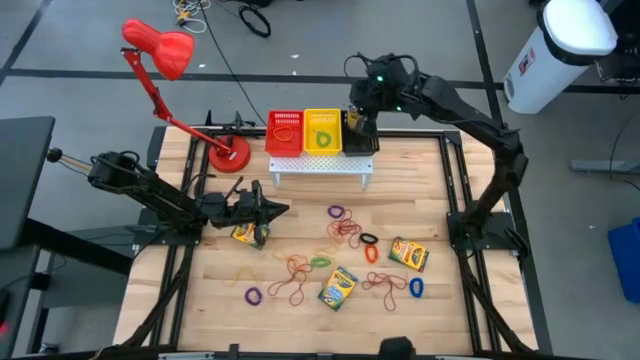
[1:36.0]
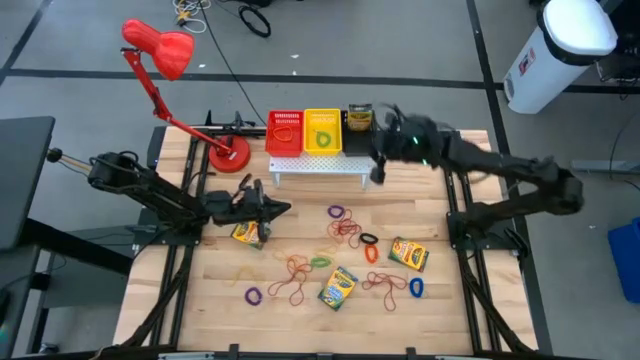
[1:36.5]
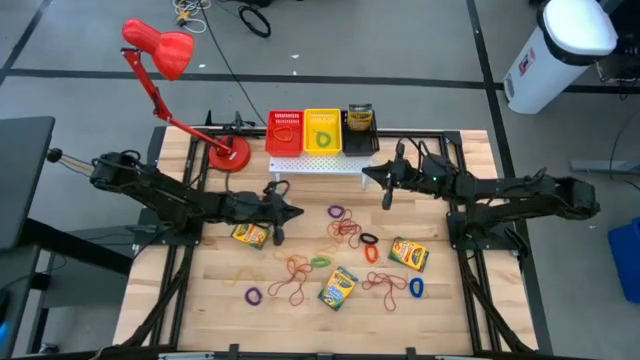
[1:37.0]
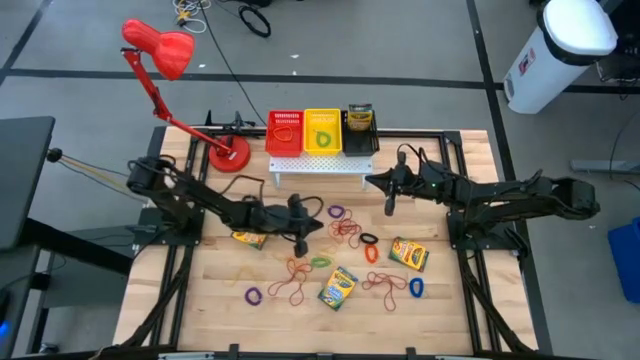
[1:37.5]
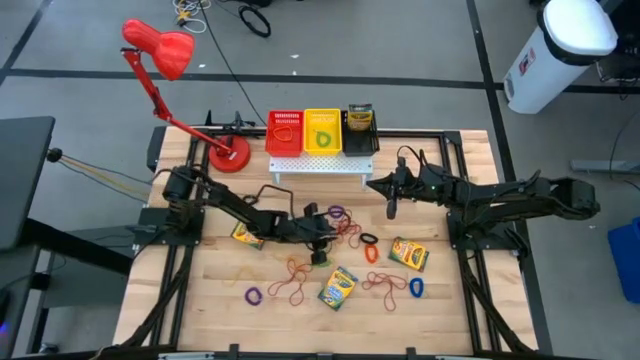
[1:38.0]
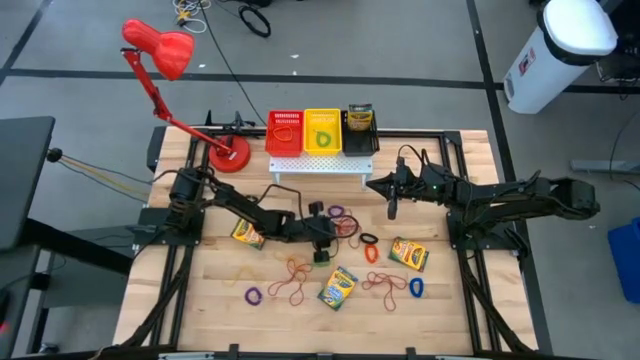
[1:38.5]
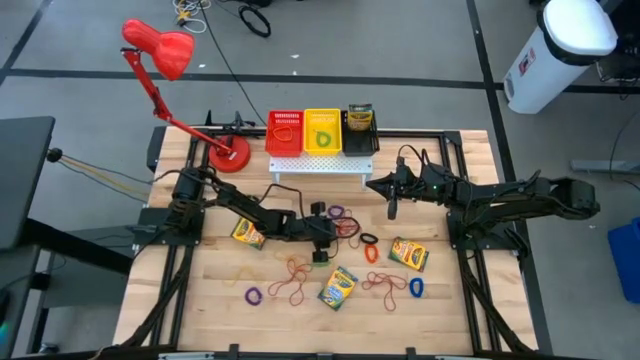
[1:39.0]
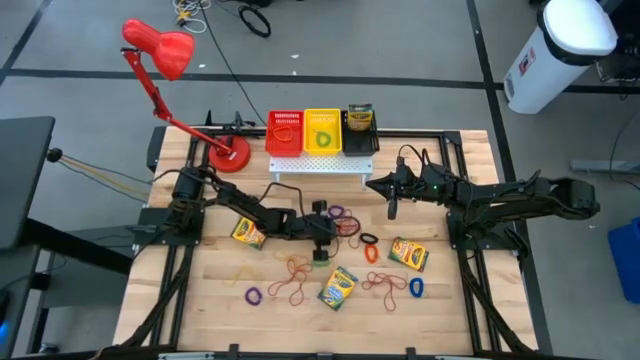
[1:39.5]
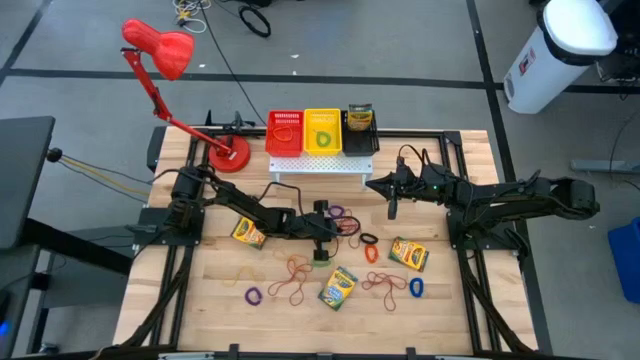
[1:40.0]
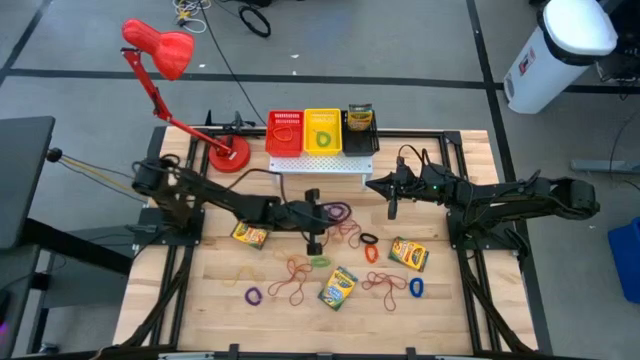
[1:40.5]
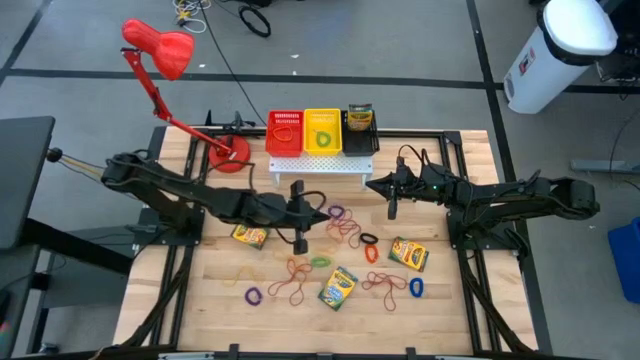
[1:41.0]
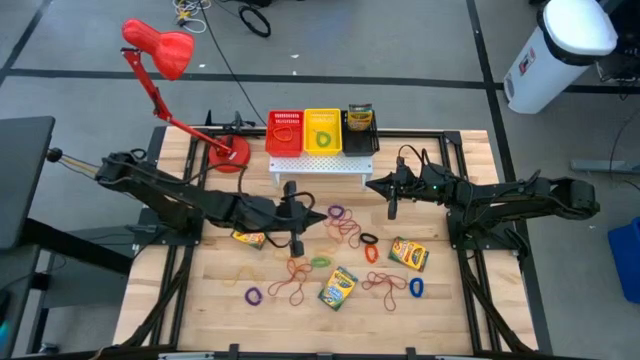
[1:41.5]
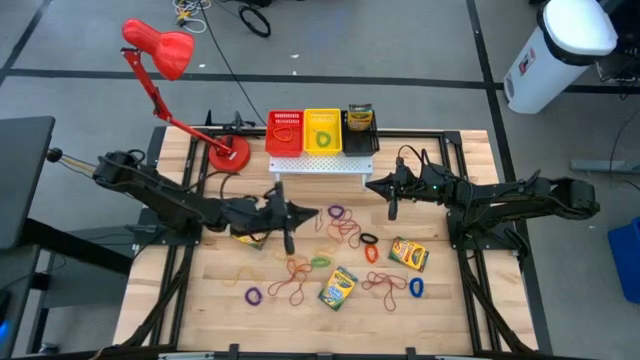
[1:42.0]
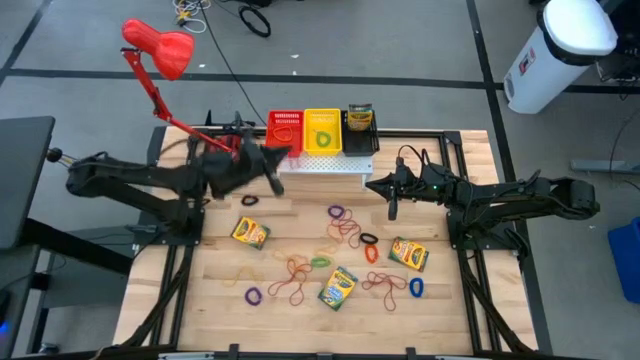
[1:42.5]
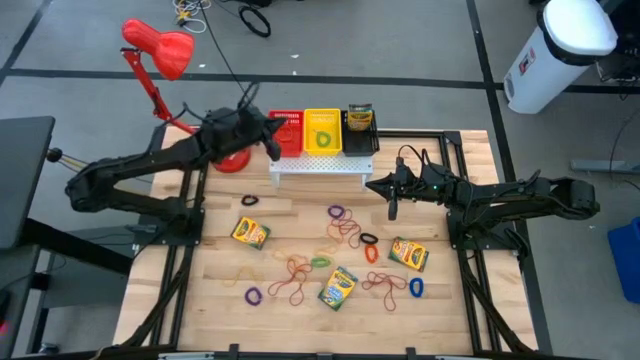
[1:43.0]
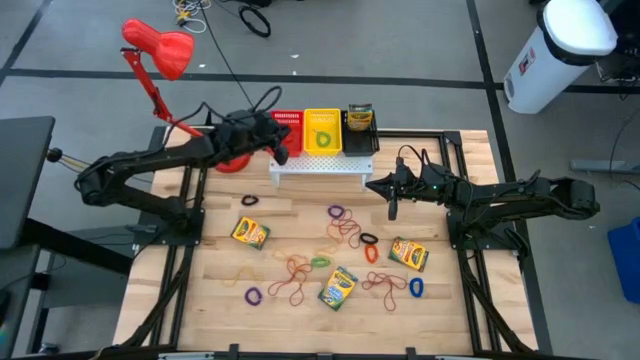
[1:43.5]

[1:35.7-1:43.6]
Task: Pick & Place Office Desk Supplies
Put the red rubber band into the red bin on the shelf

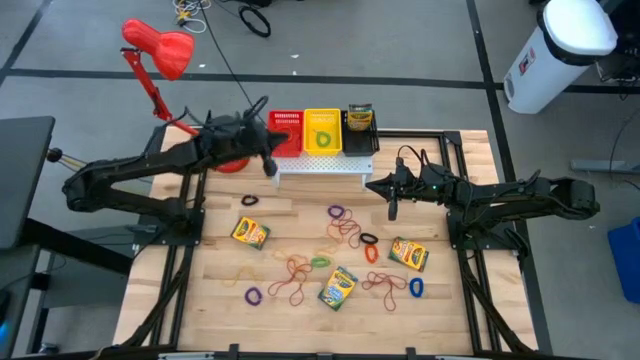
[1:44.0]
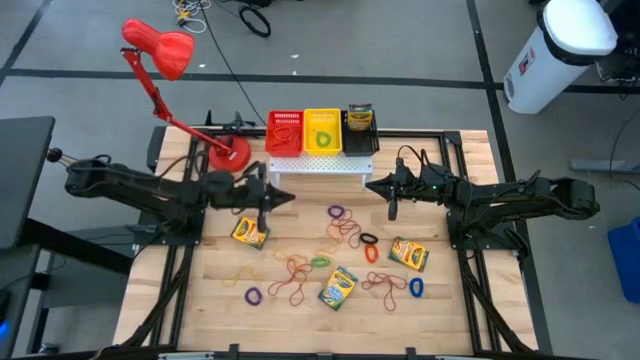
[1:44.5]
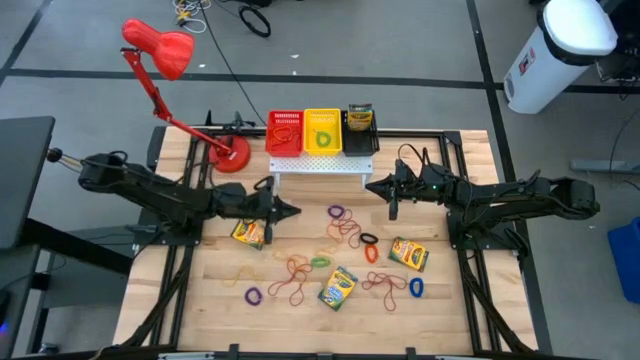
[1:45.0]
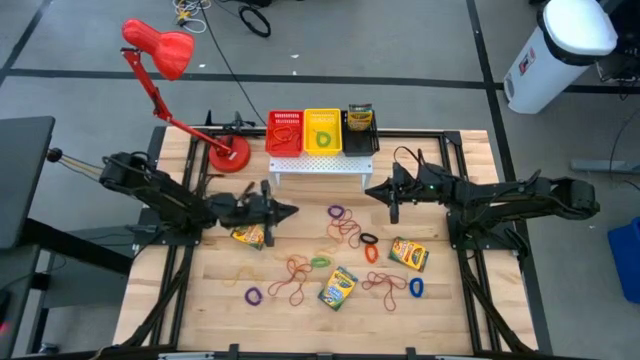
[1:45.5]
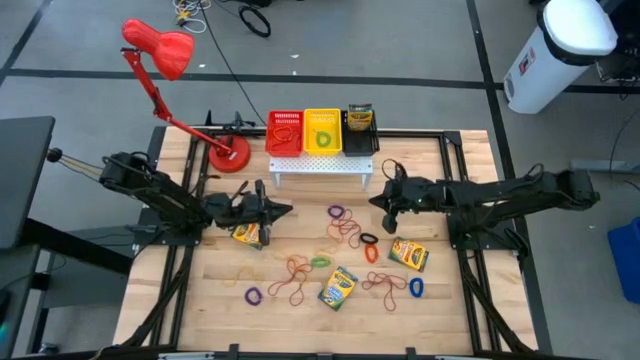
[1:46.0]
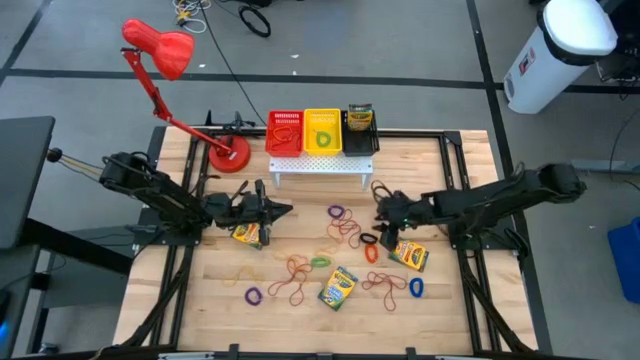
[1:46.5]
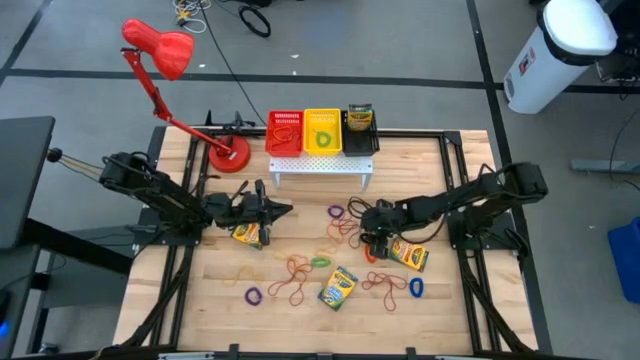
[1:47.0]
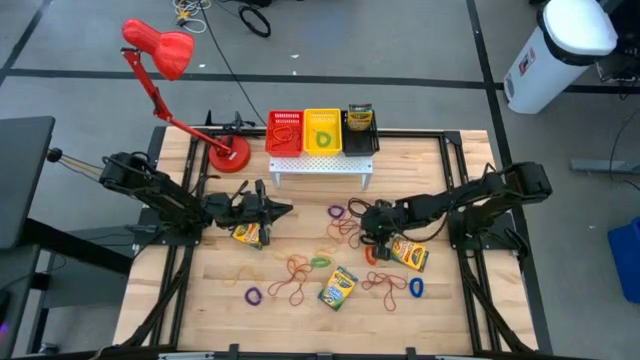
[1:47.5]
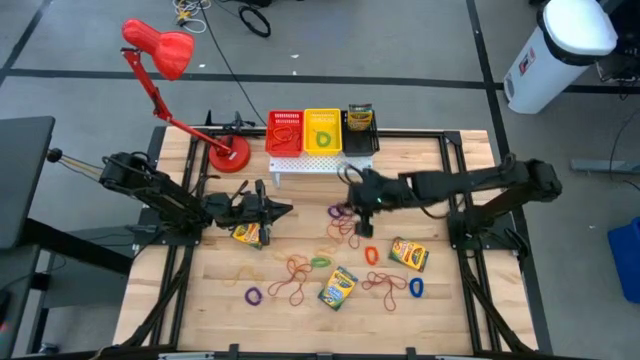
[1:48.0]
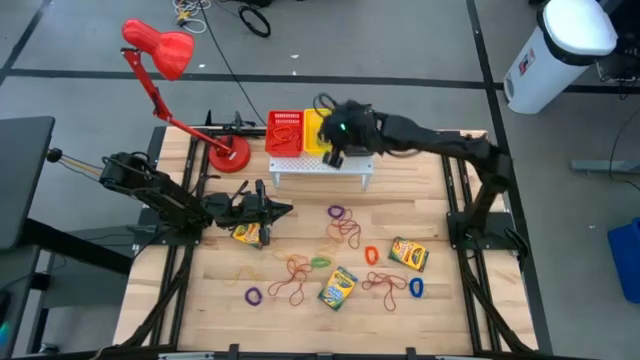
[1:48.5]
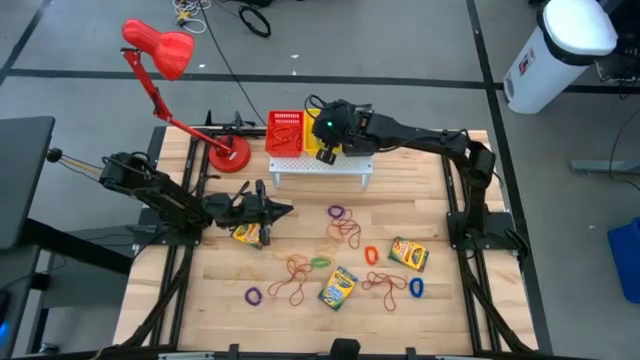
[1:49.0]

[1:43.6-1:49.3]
Put the black spring keychain into the yellow bin on the shelf

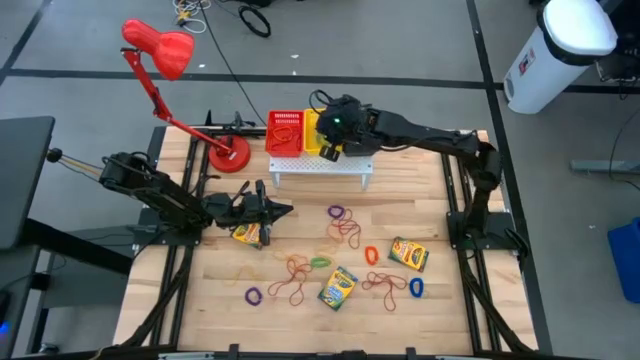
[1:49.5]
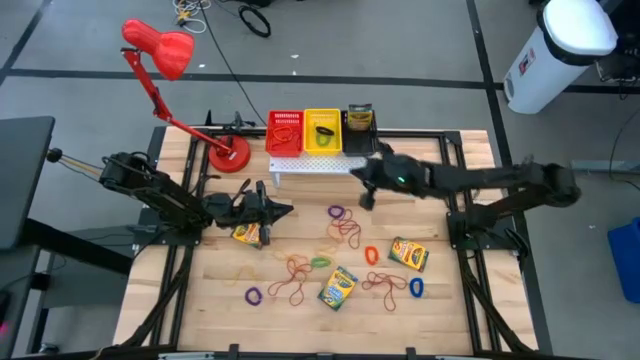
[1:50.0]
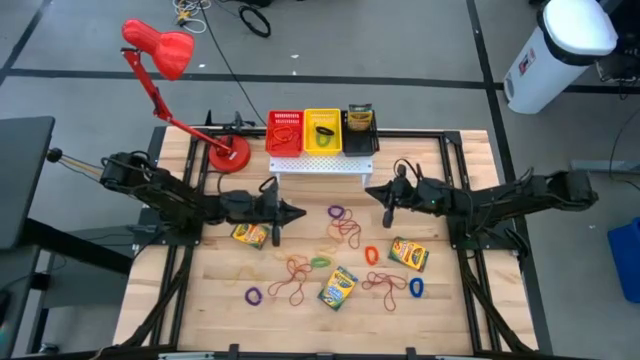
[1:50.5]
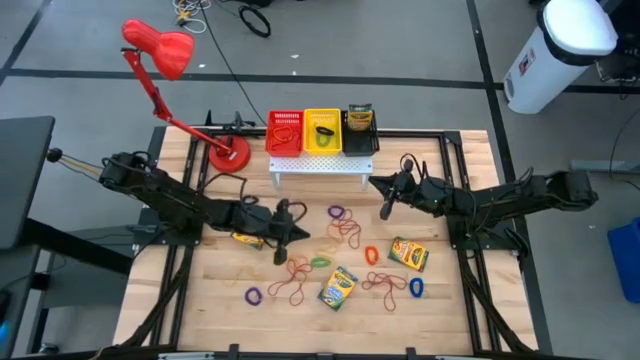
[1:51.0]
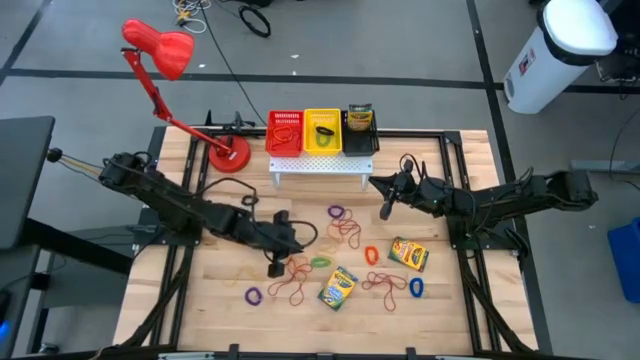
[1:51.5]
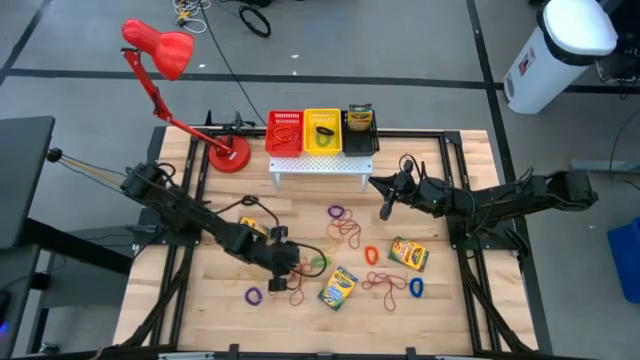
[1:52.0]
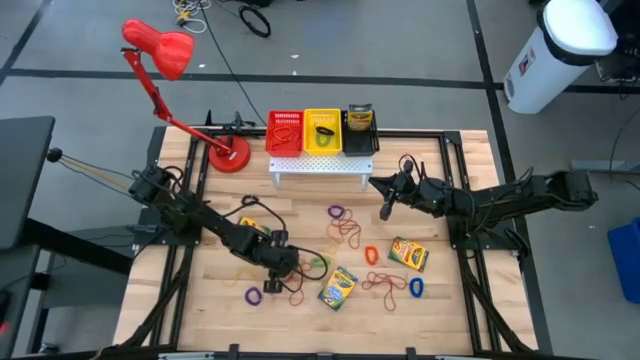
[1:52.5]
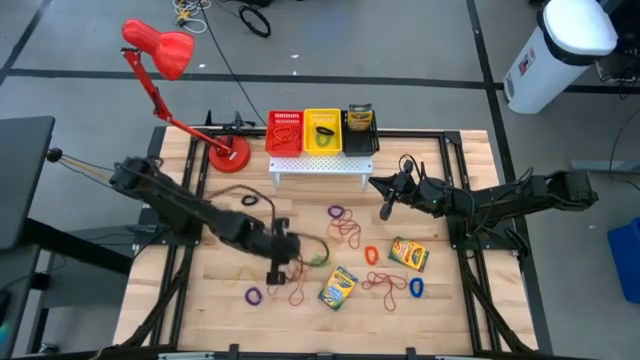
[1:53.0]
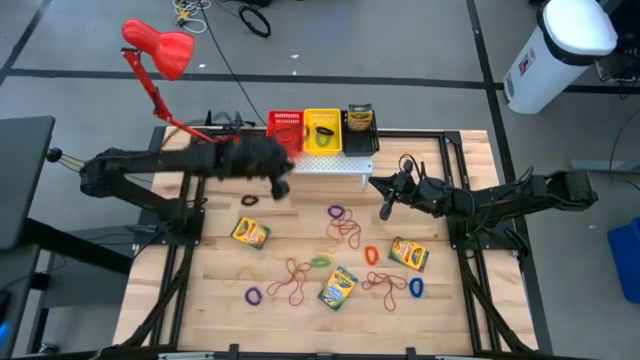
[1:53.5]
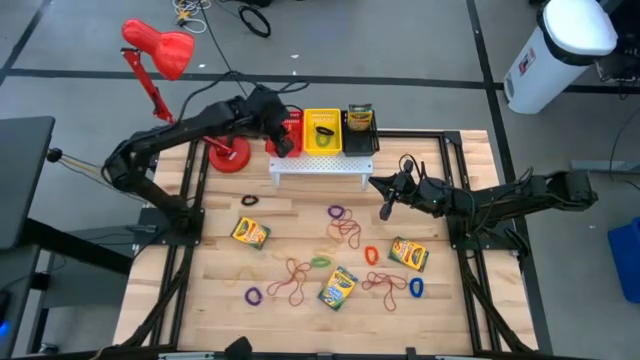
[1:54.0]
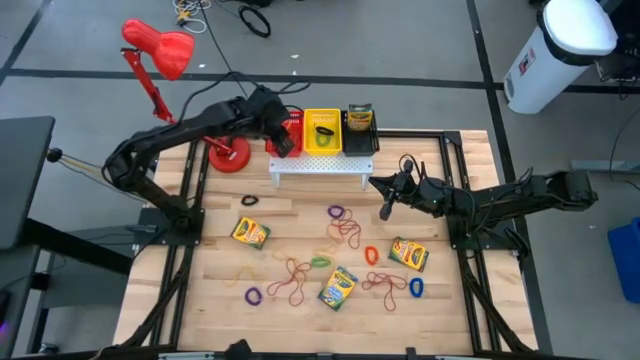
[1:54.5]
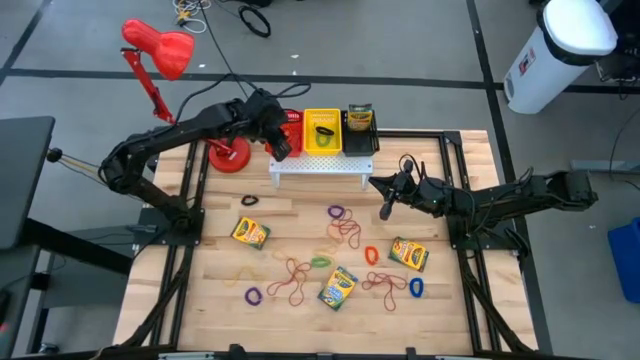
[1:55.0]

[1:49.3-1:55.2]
Put the orange rubber band into the red bin on the shelf
